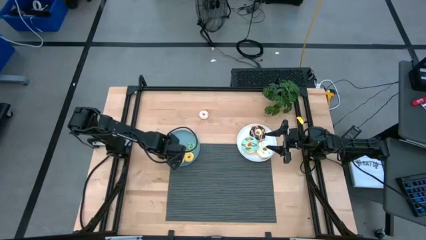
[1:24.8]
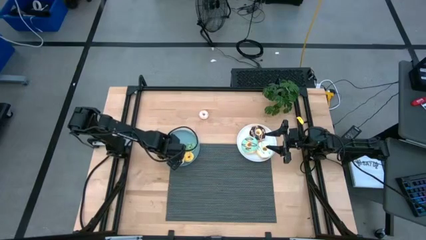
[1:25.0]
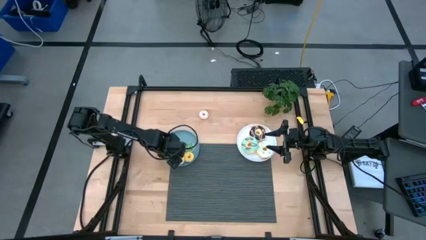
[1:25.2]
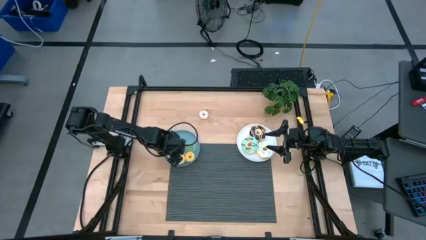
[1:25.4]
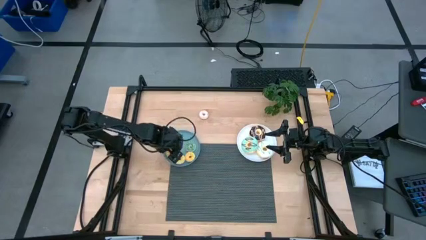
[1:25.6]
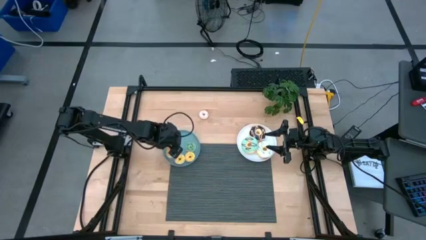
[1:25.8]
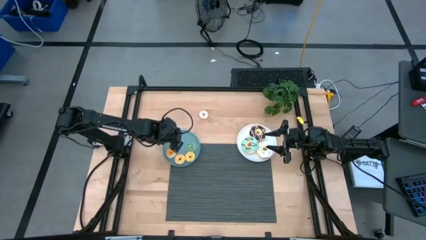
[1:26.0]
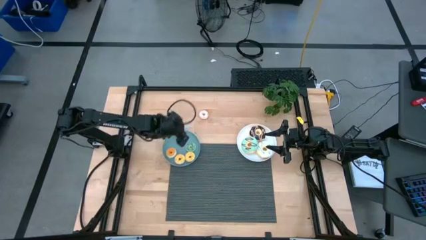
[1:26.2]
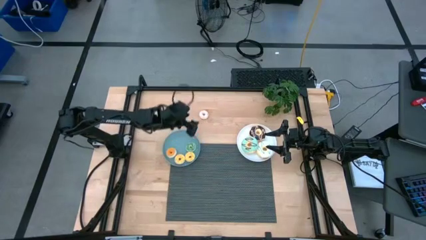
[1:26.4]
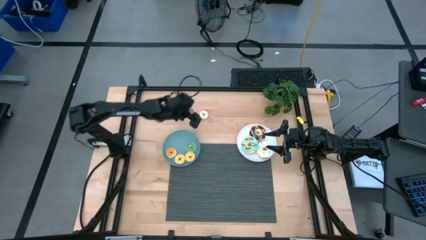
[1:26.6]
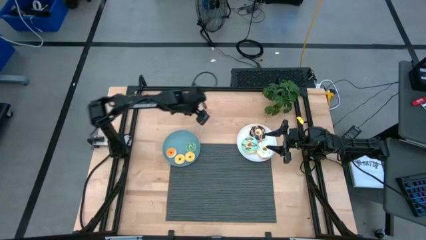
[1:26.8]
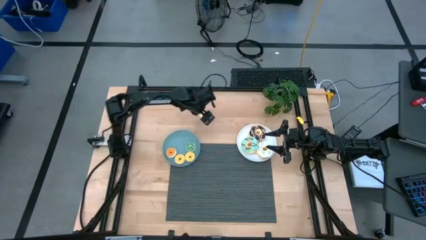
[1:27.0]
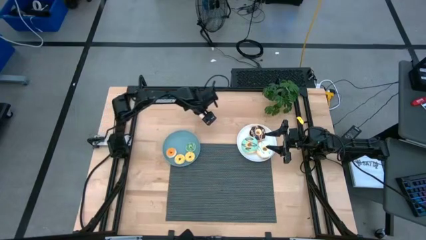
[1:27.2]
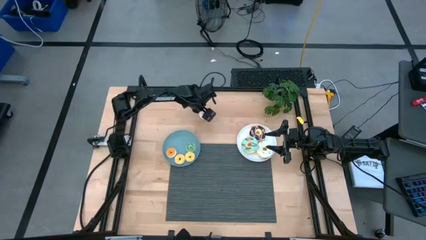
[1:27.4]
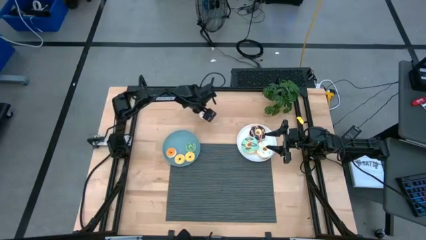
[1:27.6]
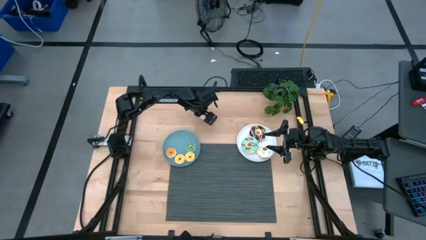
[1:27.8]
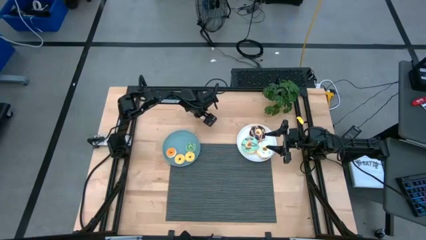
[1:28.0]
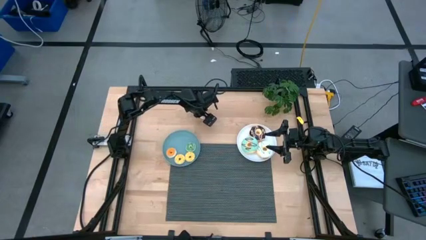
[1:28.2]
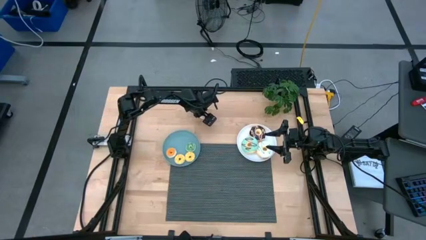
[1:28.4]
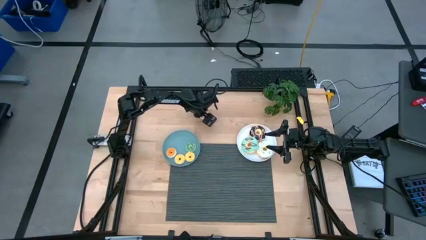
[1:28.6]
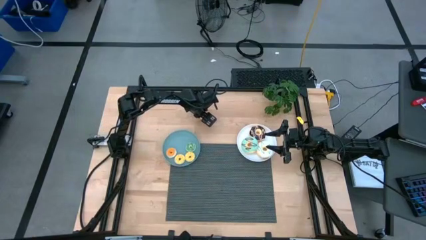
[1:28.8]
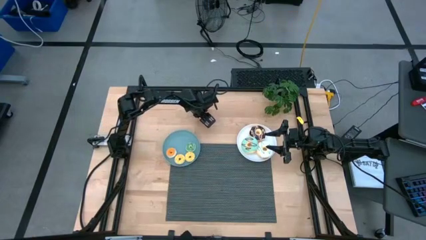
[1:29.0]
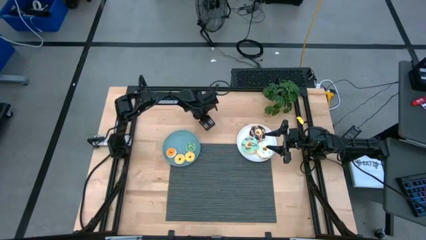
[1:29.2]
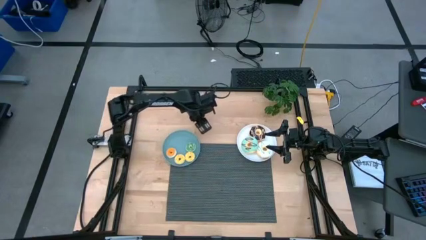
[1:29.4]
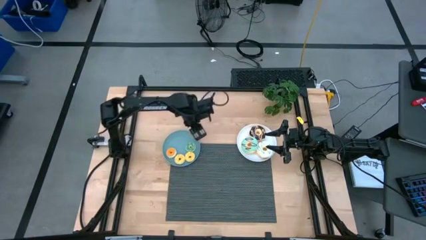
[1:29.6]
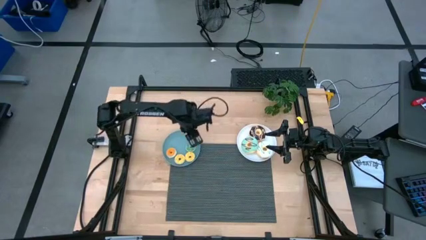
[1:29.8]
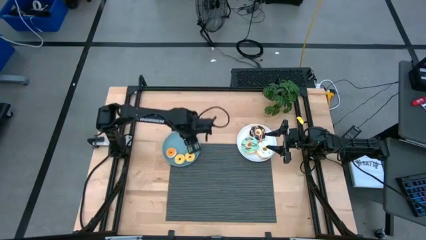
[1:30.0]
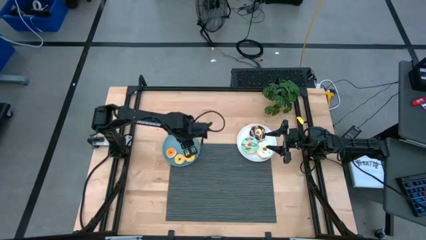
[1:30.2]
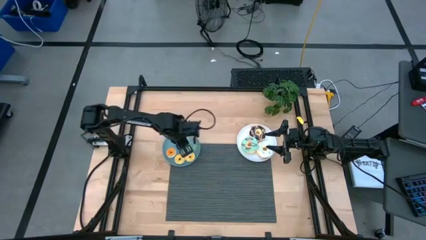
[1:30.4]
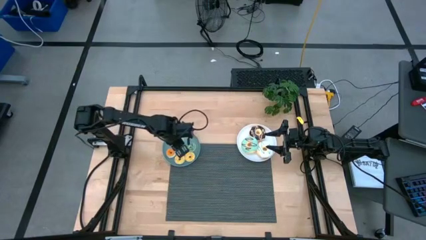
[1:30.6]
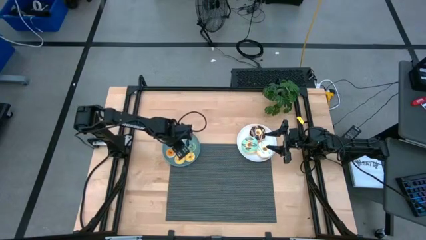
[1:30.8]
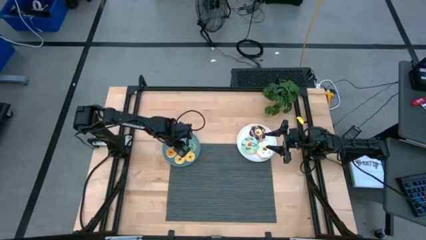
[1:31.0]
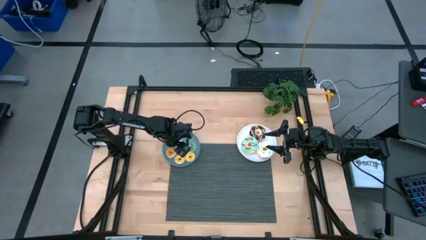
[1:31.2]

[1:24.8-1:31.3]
Task: Pick & Place donuts
Put the white small donut on the blue plate

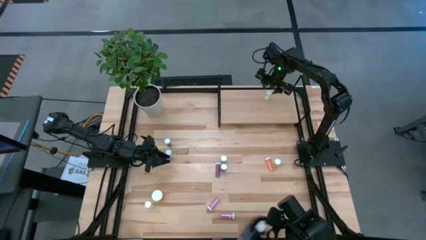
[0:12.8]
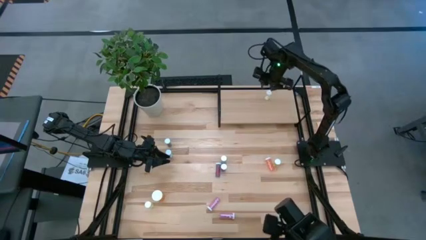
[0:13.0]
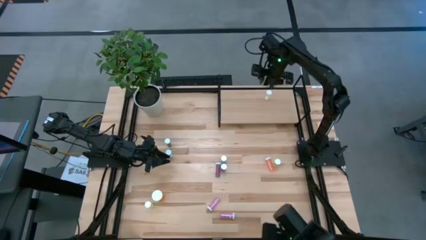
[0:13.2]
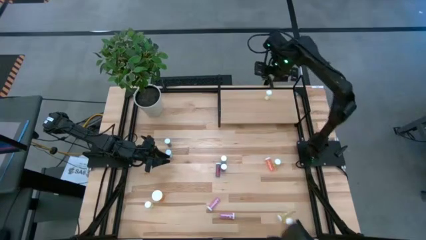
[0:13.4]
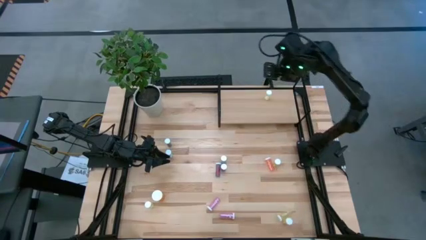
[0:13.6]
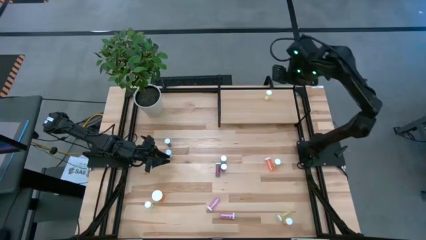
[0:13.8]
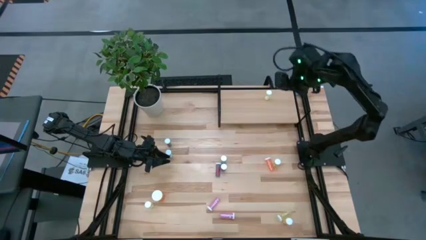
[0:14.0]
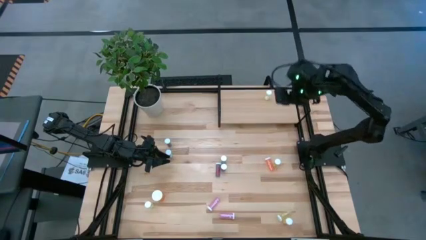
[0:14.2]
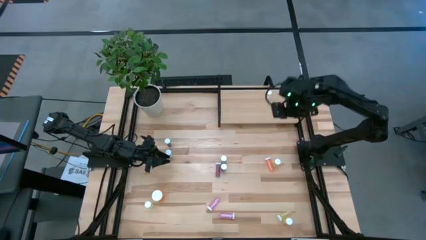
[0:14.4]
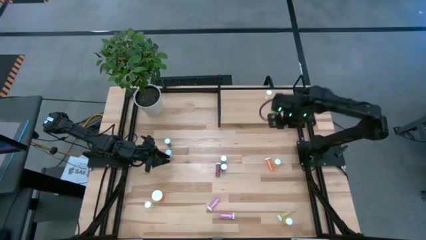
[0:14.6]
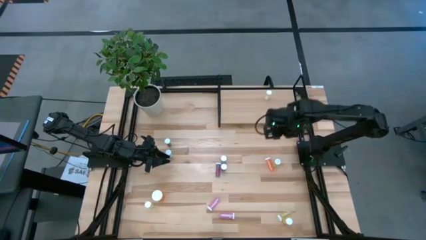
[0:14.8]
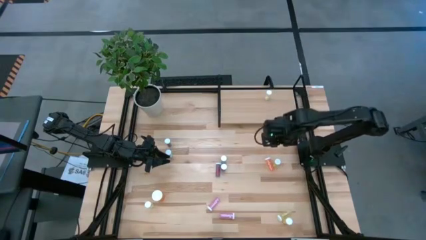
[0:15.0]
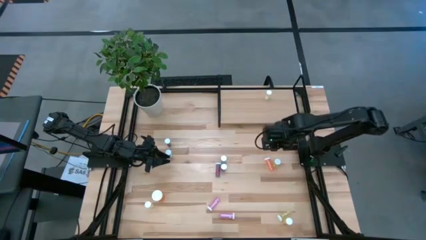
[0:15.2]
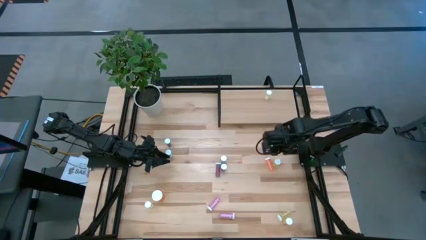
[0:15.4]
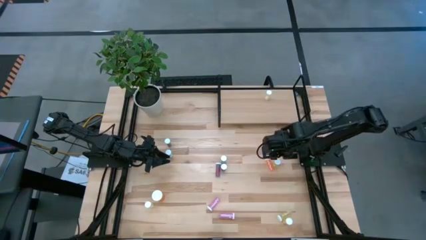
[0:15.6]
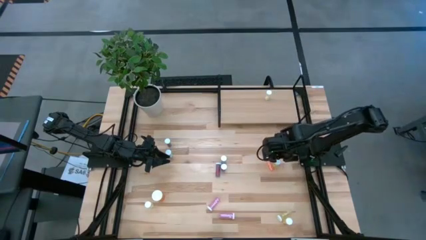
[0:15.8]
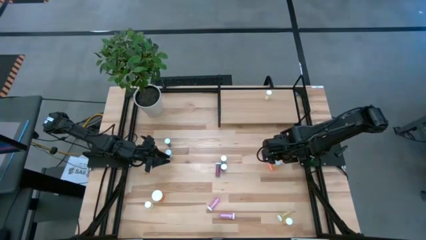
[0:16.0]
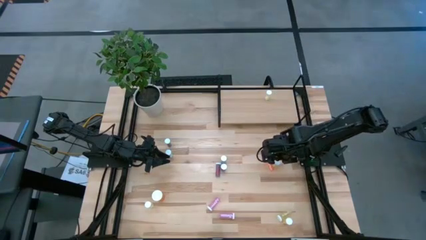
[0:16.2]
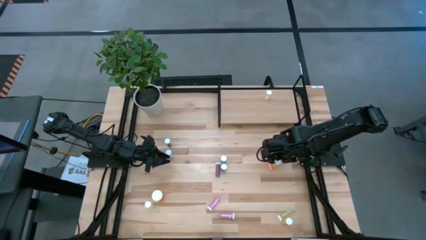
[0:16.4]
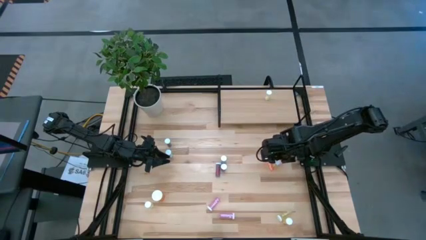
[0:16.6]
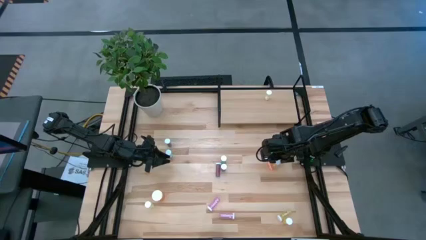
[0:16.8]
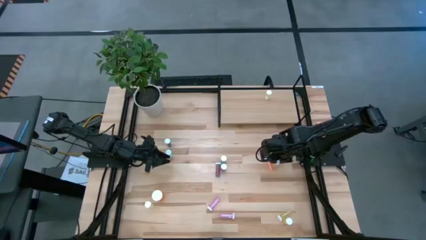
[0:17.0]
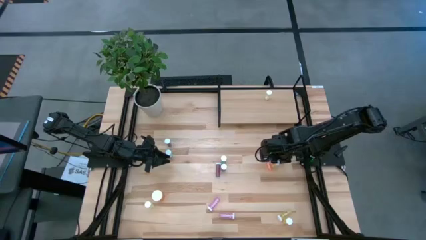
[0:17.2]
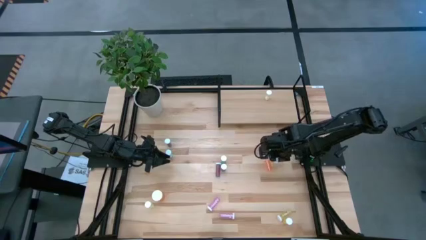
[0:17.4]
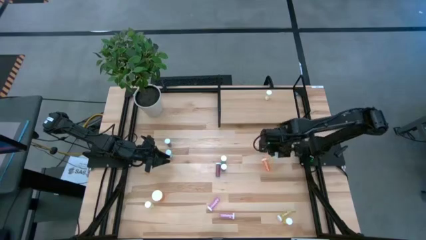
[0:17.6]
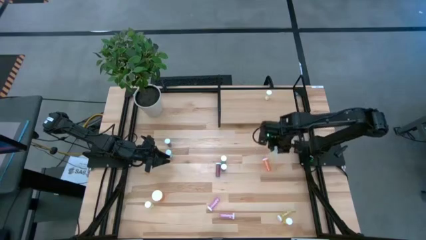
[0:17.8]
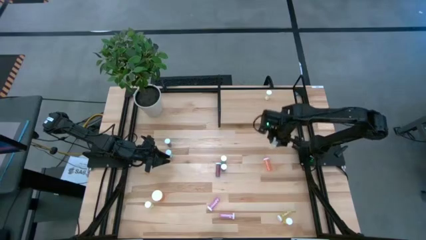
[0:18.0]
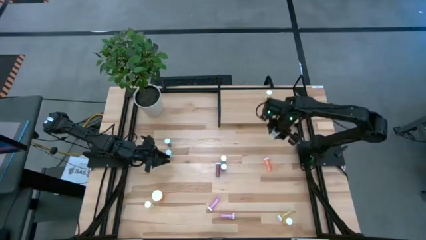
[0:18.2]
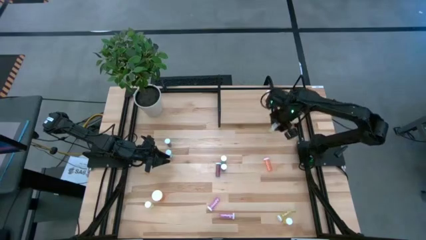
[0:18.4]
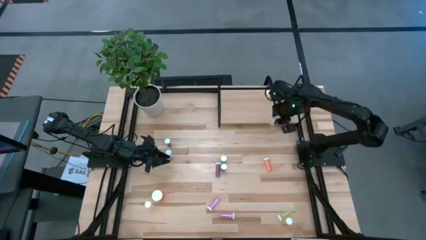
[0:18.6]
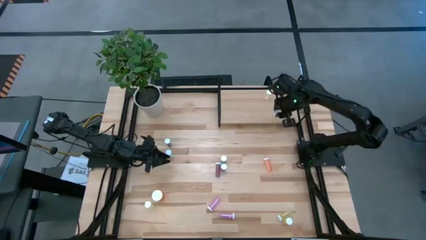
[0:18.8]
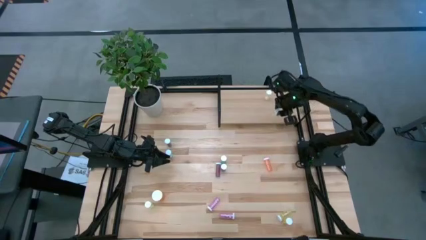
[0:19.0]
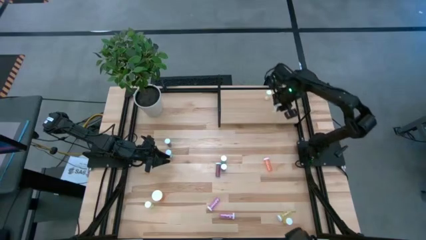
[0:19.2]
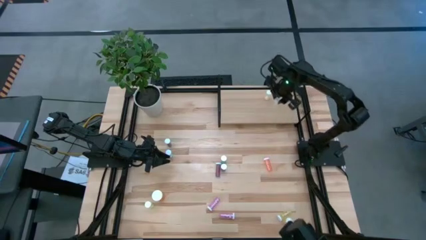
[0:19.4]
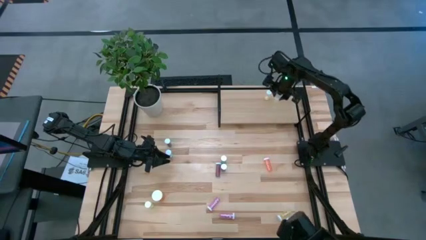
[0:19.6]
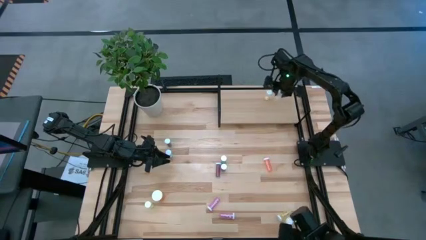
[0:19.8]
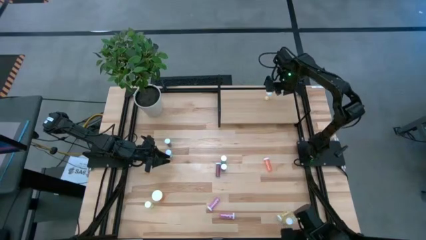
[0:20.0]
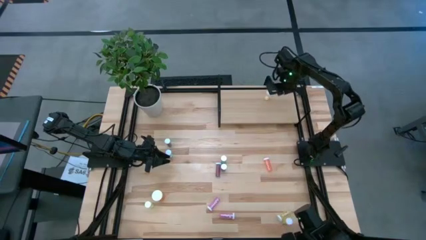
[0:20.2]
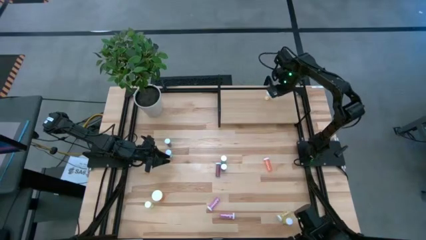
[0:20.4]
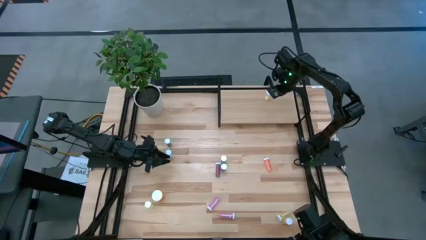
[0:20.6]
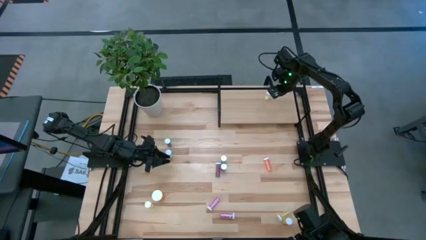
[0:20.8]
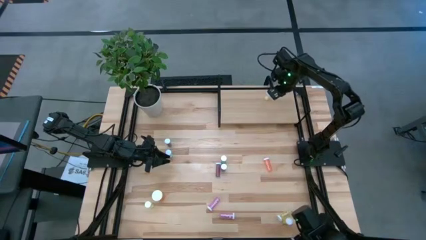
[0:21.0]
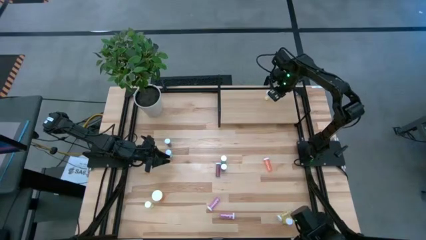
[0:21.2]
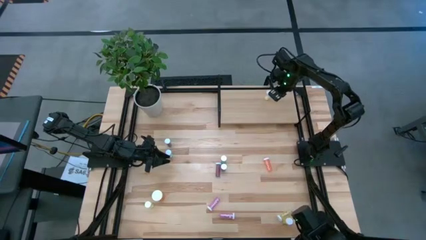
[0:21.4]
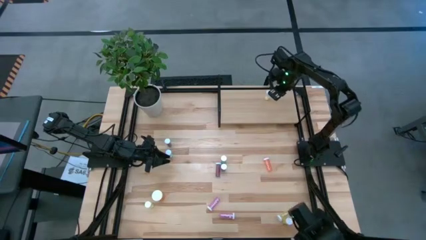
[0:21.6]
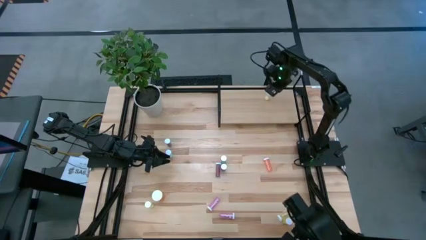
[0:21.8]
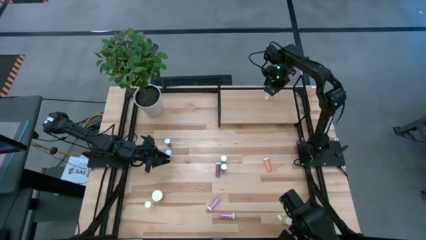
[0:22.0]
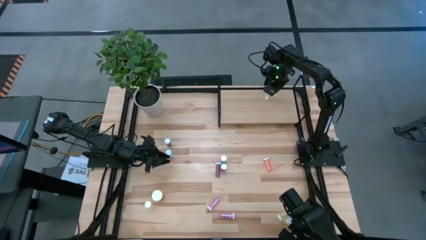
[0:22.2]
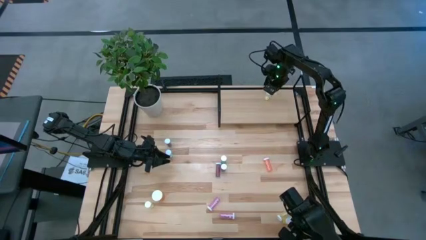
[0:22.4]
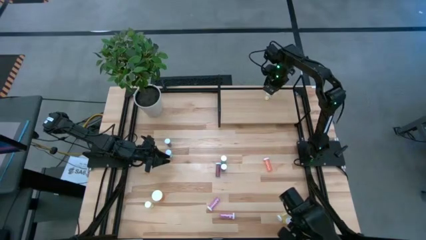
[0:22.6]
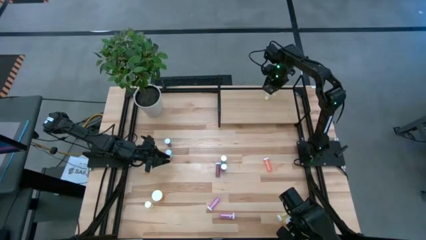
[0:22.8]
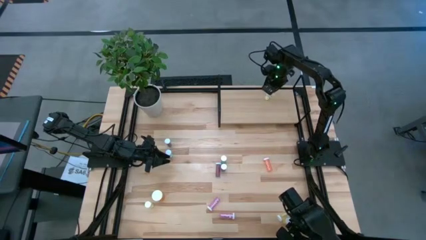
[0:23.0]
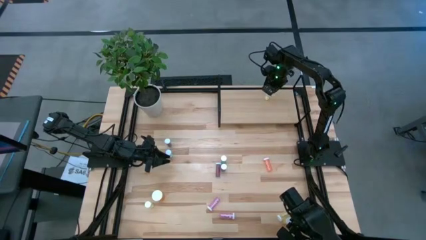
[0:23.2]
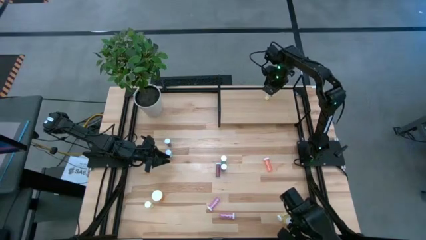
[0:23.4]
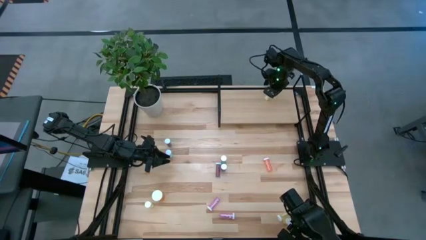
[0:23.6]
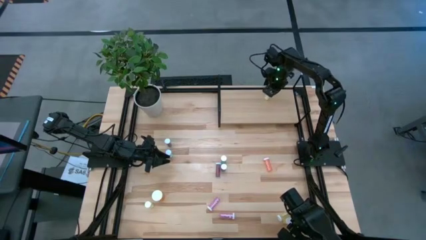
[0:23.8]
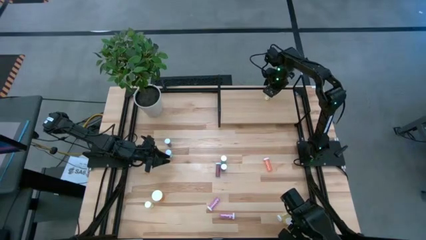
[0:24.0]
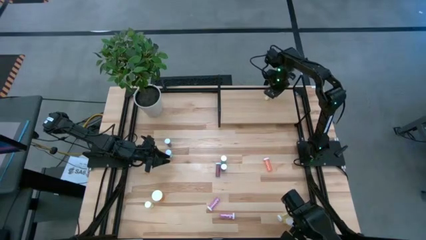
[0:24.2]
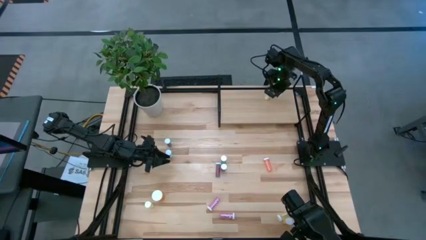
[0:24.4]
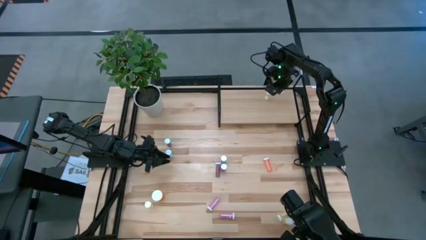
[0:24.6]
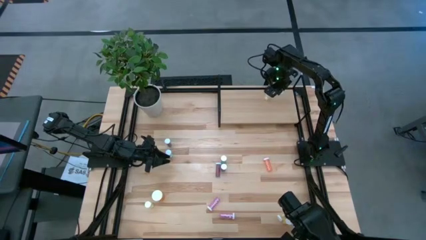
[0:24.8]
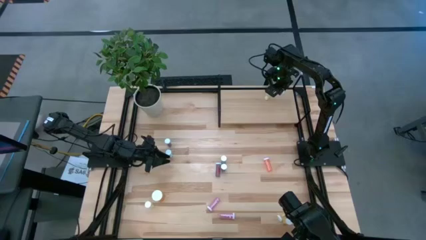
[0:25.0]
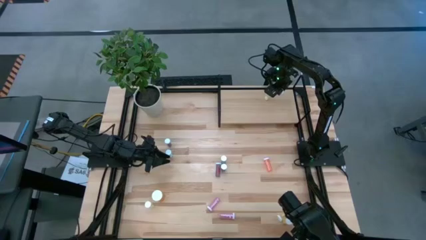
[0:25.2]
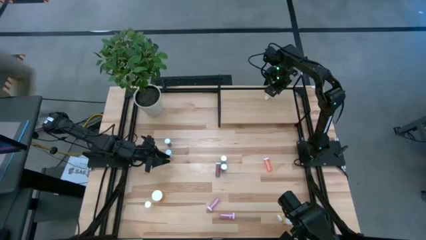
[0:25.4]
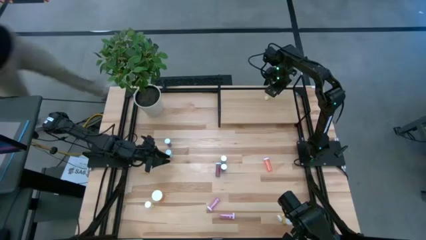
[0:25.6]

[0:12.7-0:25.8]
Task: Pick and place medicine bottles onto shelf by color
Put the yellow pill bottle on the shelf
